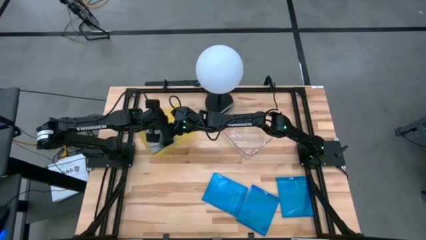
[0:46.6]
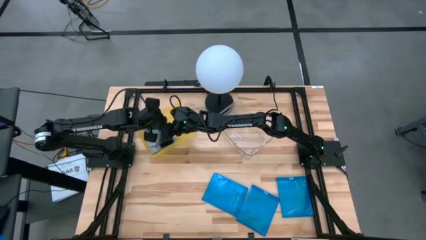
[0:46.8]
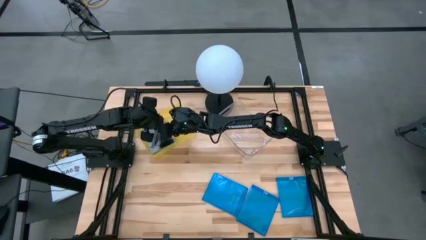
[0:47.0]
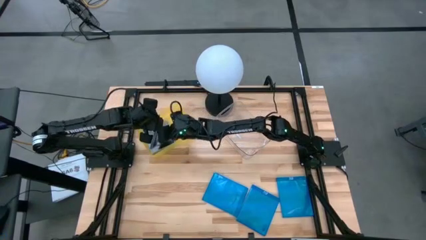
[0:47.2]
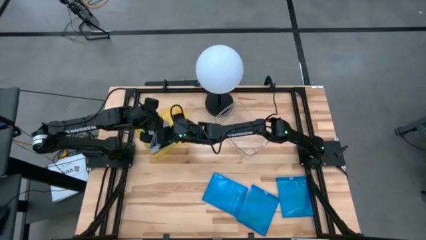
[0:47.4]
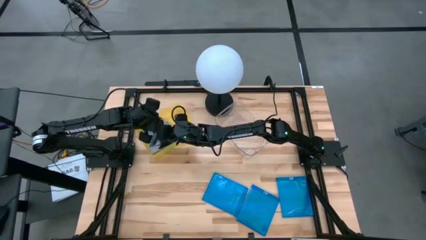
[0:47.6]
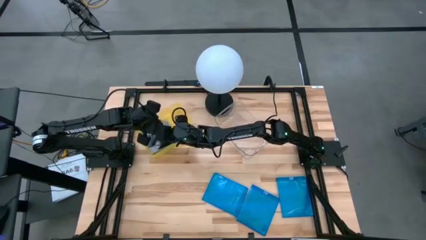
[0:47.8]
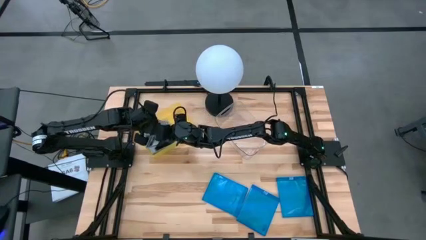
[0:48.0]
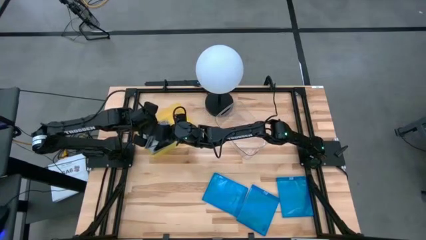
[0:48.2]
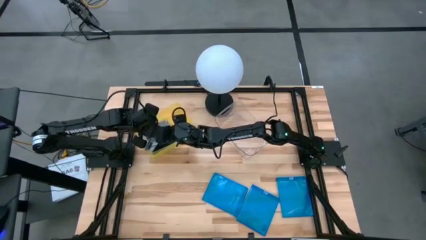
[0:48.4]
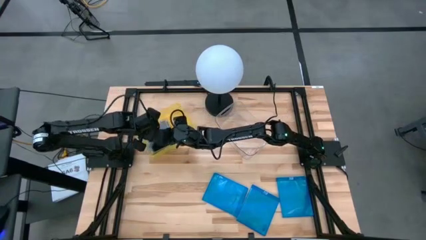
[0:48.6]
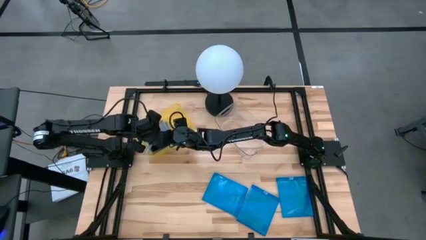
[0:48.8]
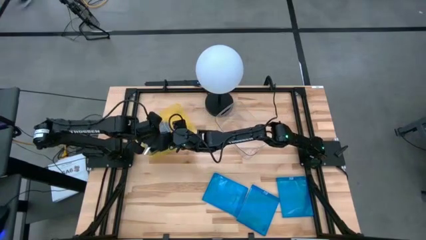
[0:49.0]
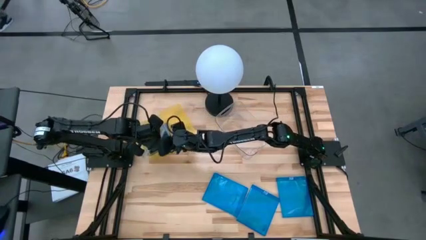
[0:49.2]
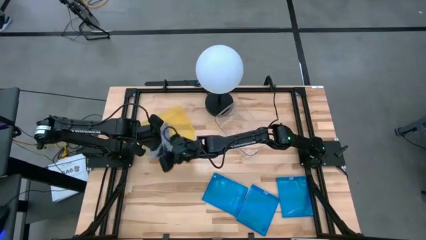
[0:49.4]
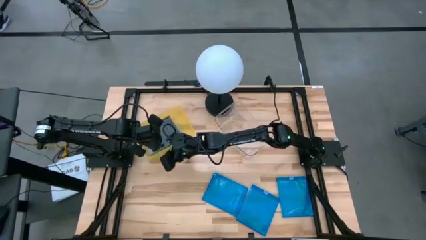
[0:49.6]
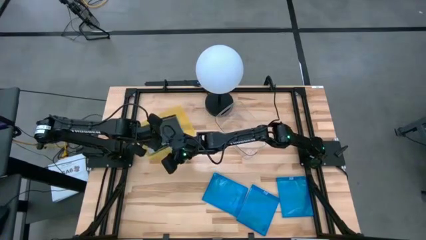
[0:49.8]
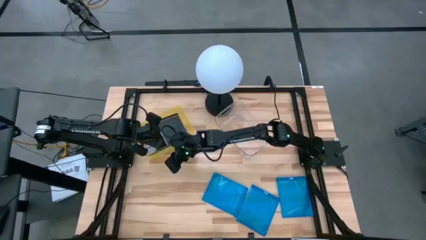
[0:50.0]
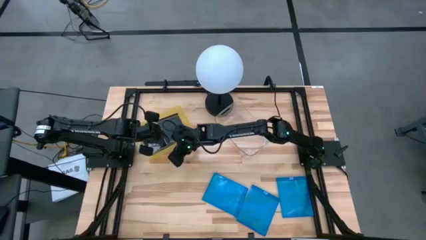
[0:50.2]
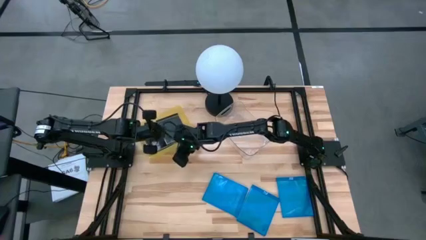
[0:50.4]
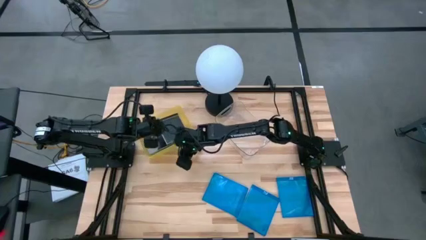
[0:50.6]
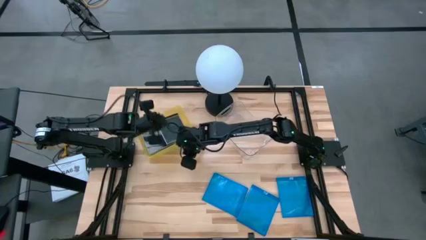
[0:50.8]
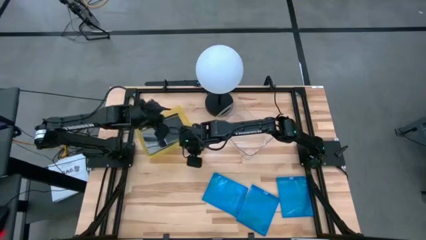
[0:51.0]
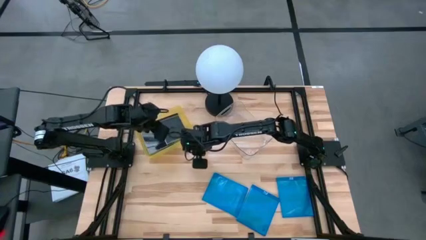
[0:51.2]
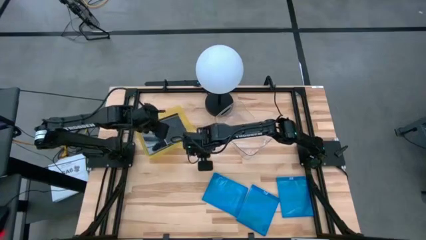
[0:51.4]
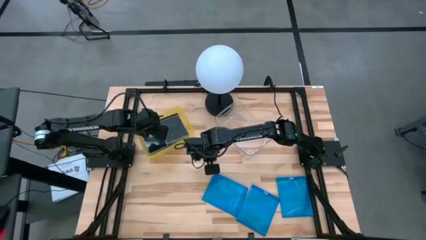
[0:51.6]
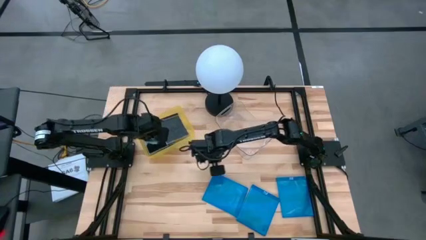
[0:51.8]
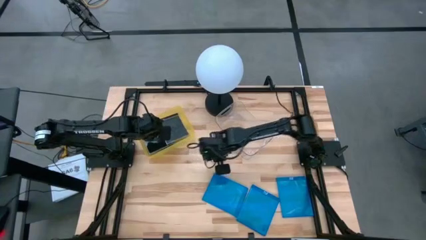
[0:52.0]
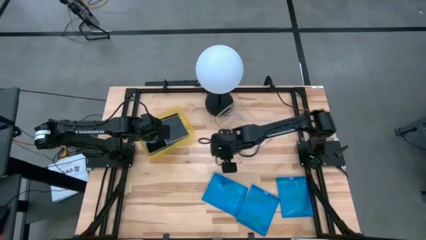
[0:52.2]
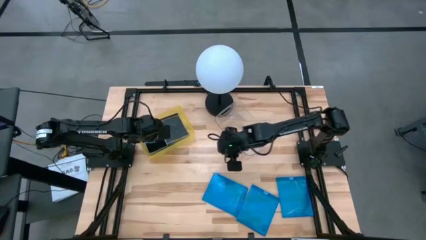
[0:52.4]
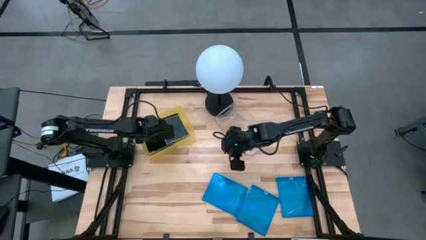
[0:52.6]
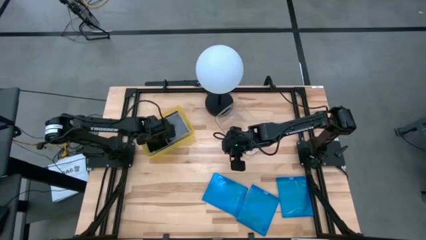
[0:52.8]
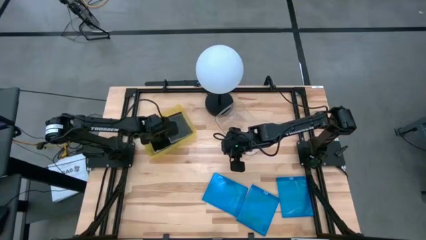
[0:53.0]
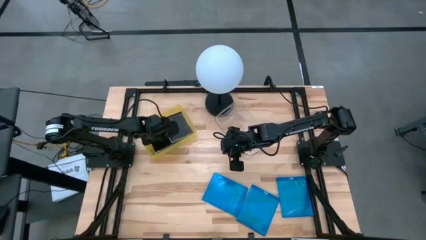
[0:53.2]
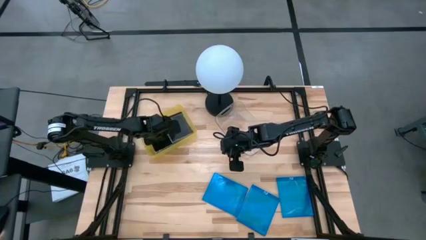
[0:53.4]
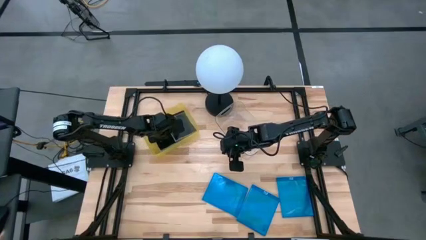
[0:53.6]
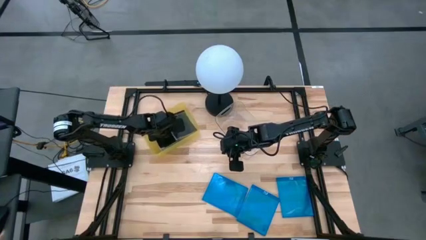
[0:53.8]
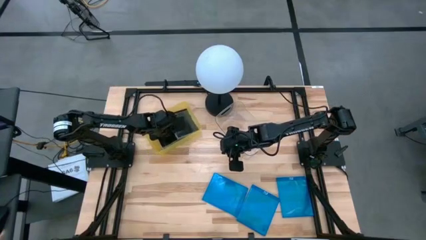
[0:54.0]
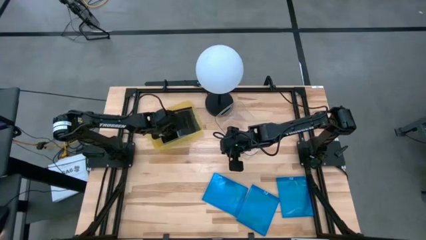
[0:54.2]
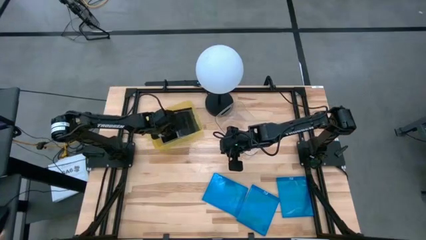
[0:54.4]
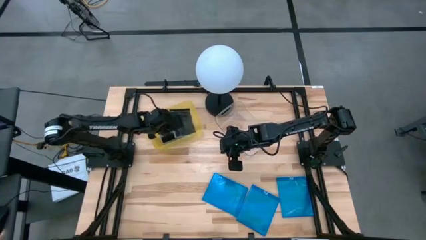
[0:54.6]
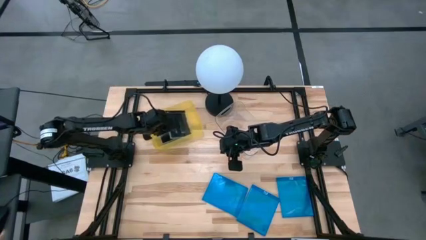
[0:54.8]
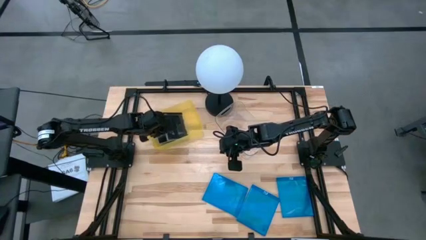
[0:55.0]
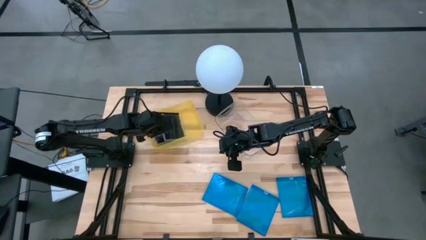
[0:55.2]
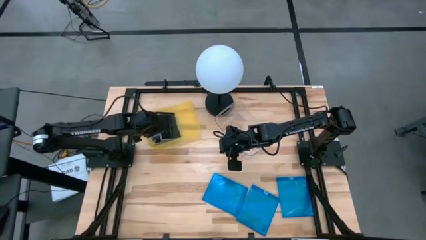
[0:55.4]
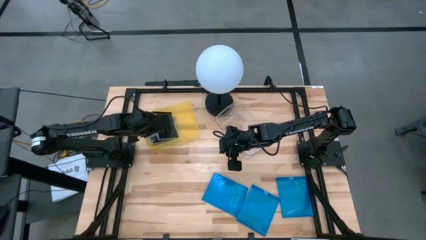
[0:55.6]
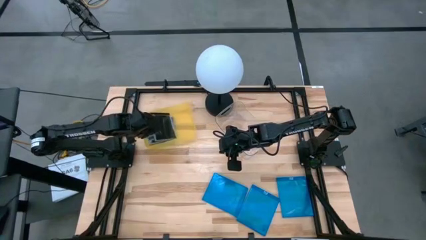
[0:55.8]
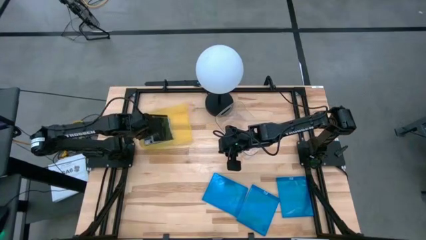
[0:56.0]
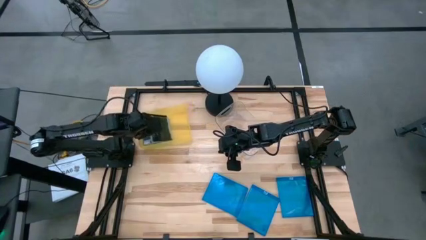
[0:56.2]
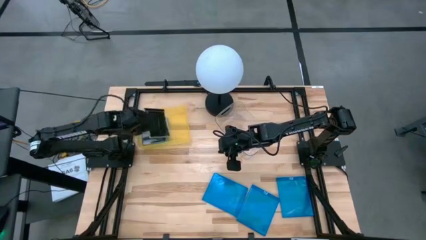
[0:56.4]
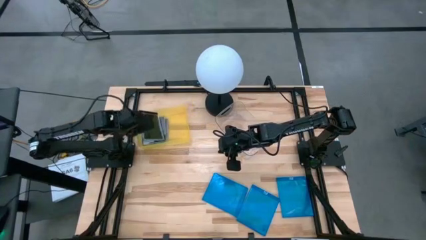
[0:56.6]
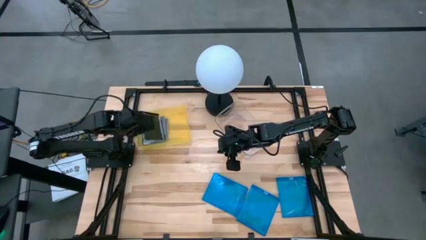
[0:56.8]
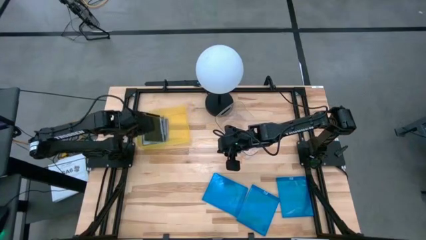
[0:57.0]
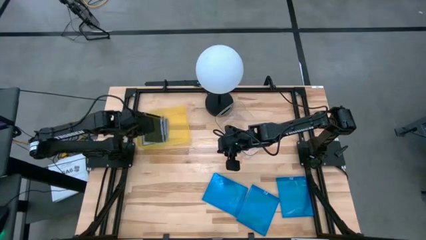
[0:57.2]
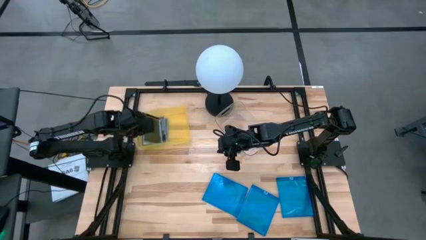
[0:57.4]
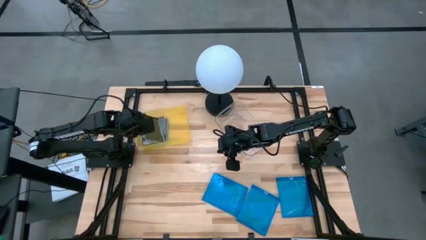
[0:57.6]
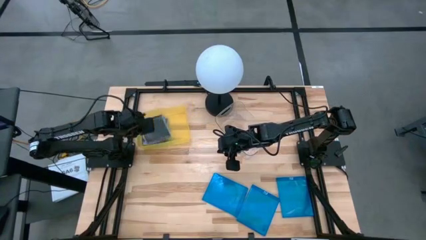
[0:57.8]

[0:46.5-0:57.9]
Task: Pick & place jewel cases by type
Put the black CD case into the yellow bin

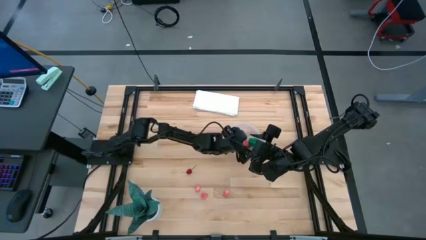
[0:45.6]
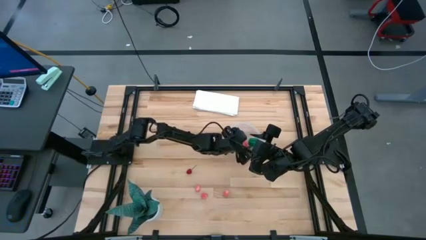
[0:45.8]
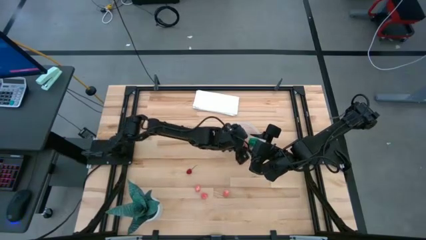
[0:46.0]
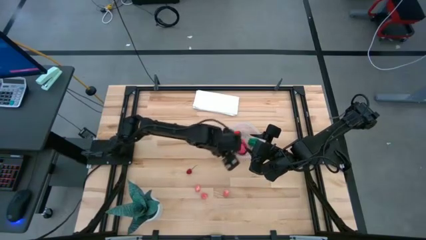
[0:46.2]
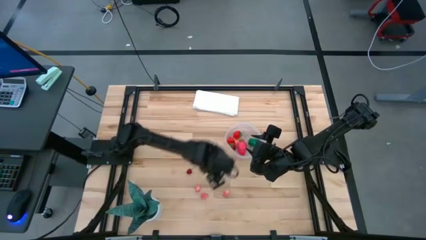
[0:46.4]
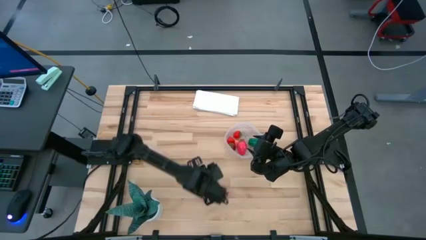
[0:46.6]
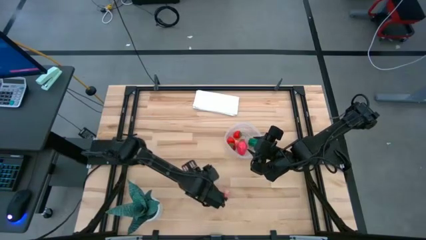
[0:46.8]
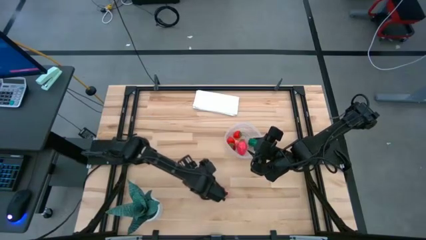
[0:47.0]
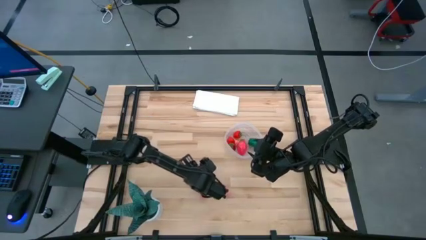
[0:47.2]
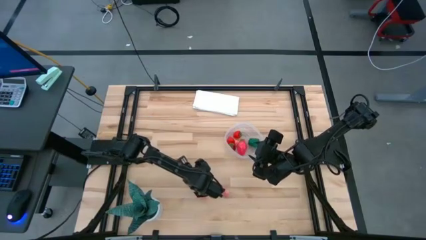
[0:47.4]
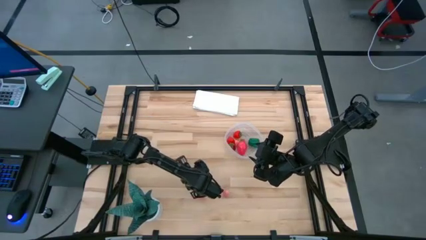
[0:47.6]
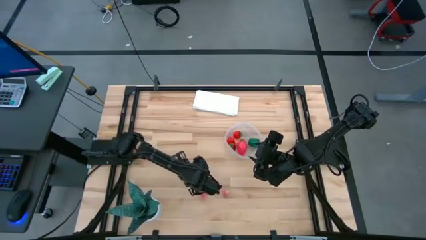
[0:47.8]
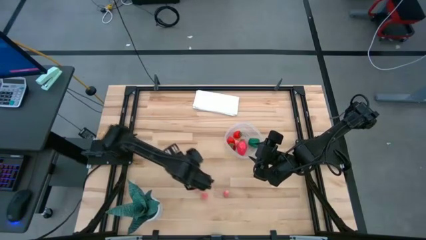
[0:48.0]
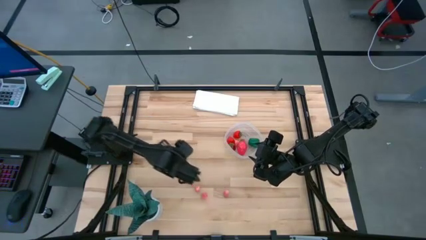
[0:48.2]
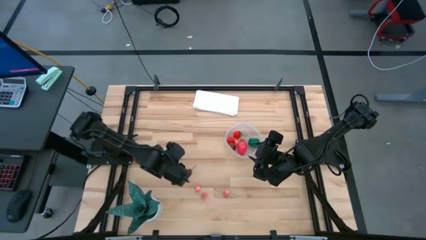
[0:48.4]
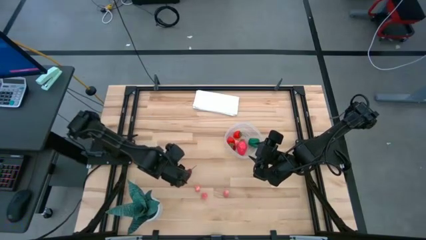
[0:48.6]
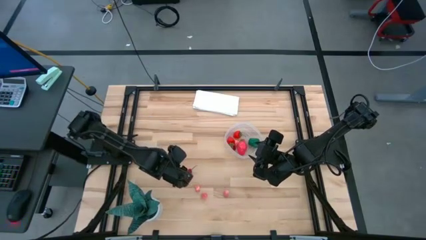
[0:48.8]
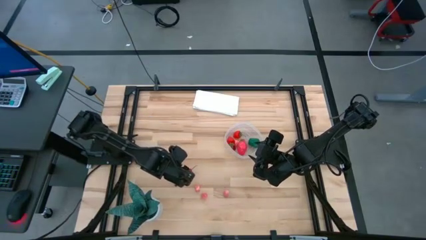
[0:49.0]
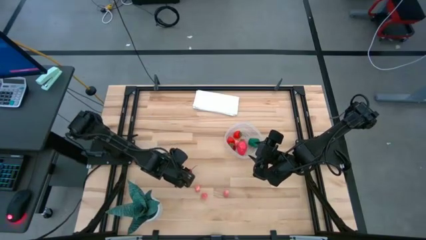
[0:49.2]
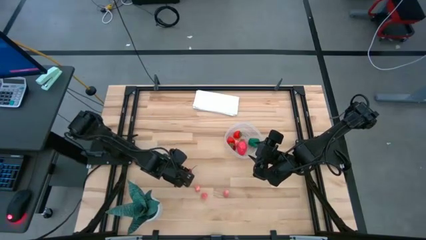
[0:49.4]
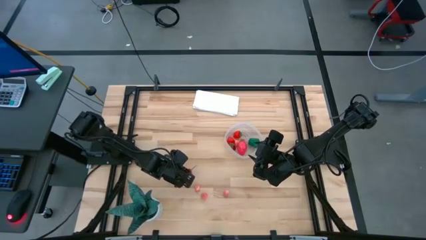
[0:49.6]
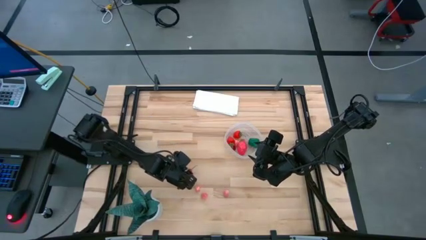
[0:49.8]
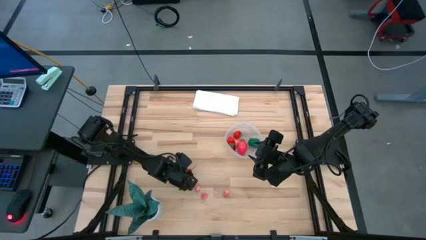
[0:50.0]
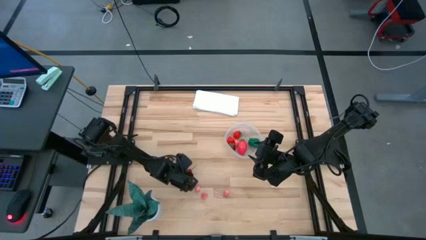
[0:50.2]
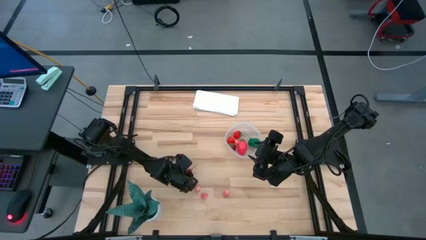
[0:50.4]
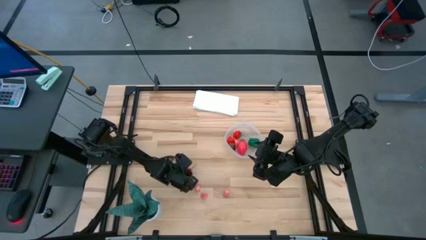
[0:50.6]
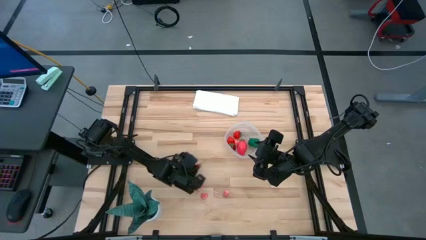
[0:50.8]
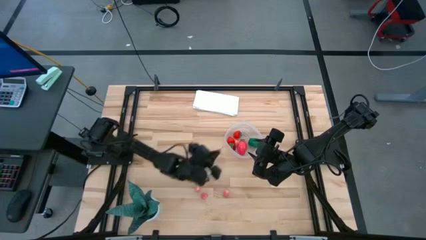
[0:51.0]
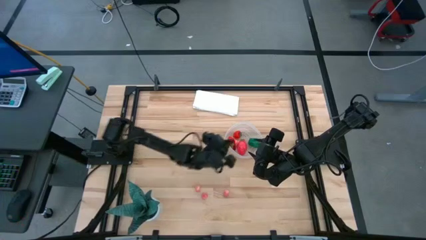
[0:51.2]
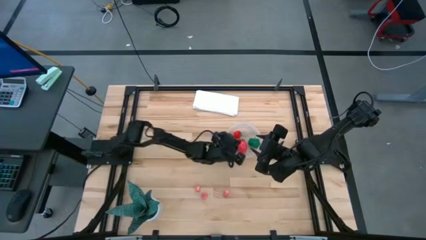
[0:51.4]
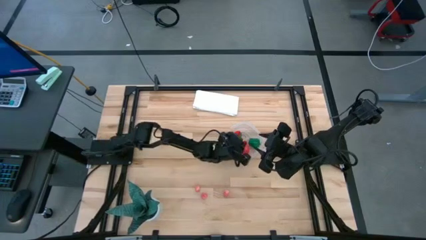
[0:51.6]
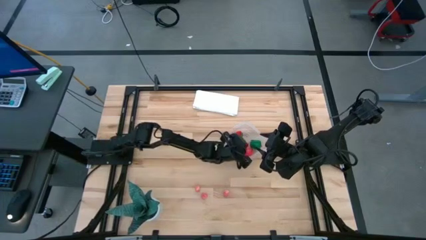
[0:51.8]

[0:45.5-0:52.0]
Task: Pick and placing Produce into tupperware
Put the red cherry into the transparent bin
